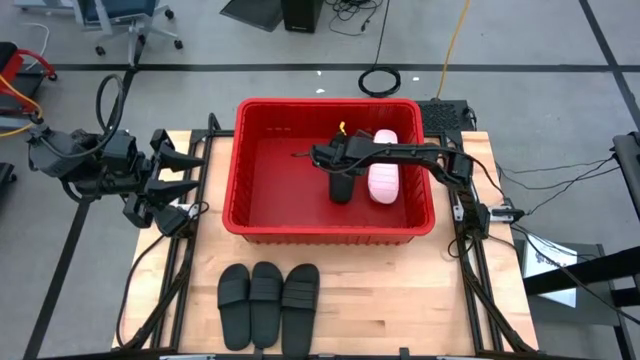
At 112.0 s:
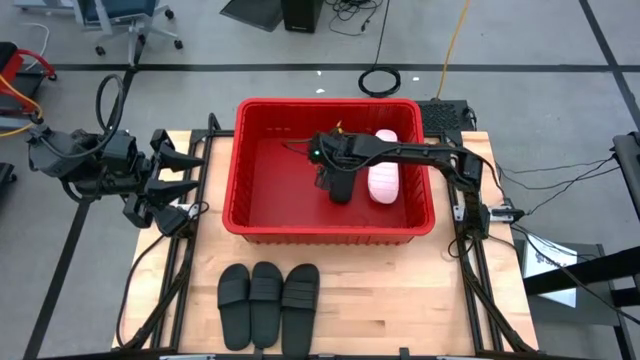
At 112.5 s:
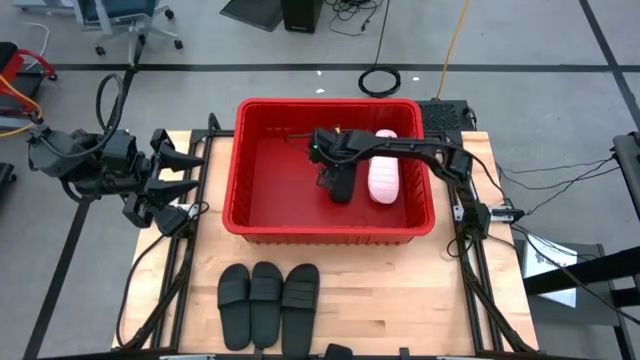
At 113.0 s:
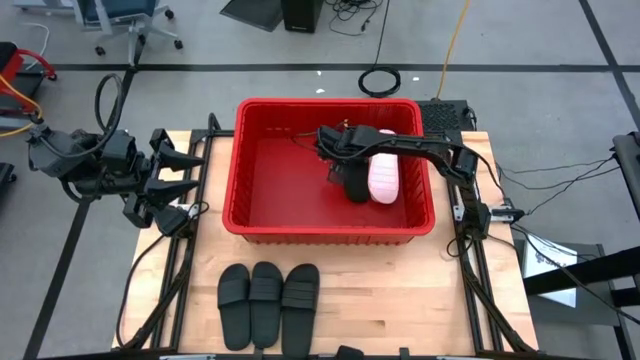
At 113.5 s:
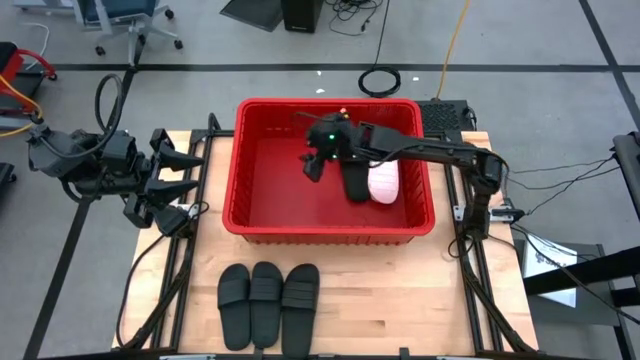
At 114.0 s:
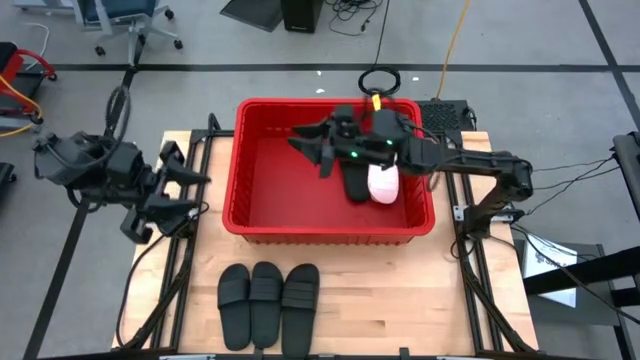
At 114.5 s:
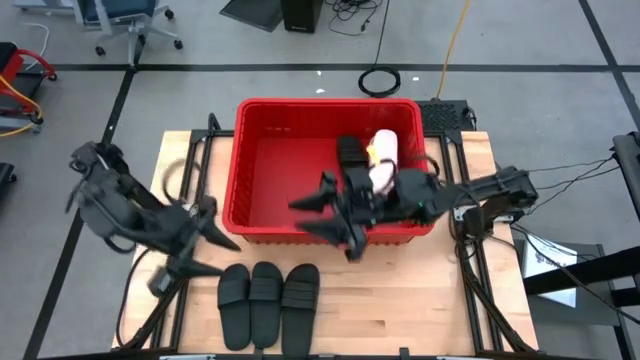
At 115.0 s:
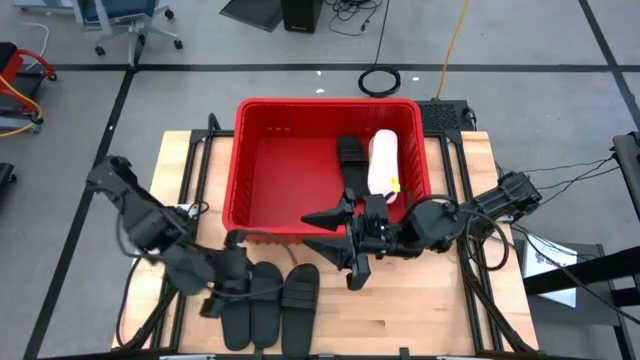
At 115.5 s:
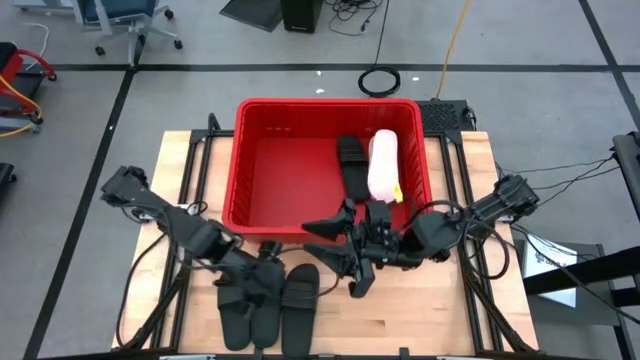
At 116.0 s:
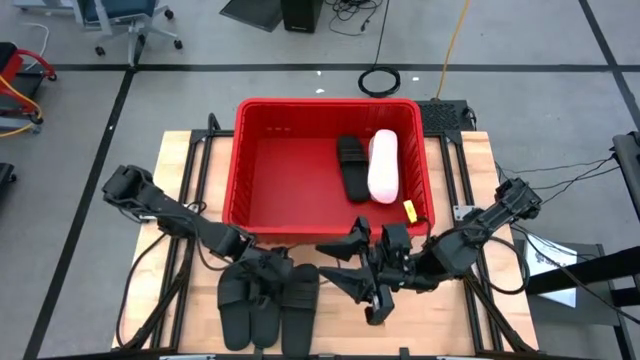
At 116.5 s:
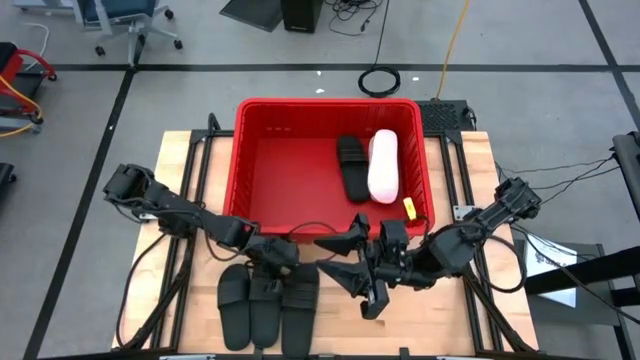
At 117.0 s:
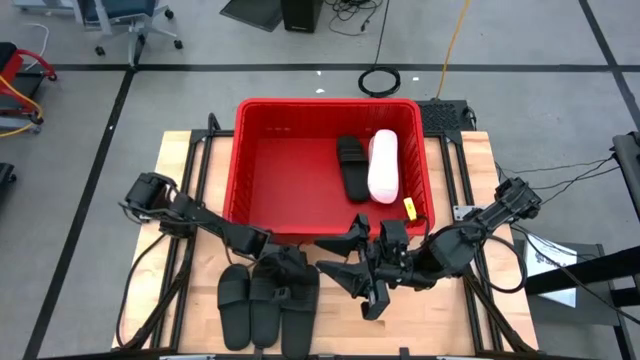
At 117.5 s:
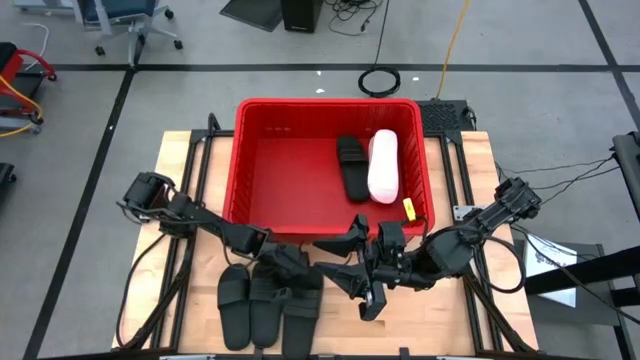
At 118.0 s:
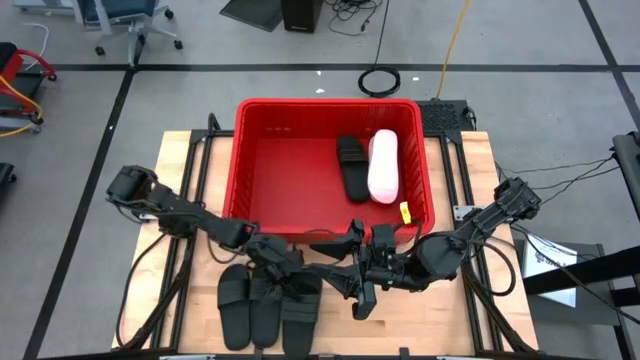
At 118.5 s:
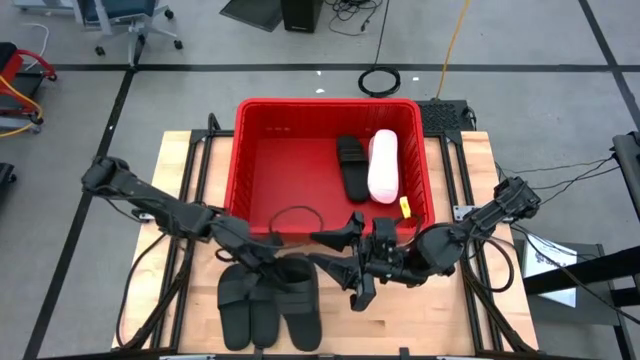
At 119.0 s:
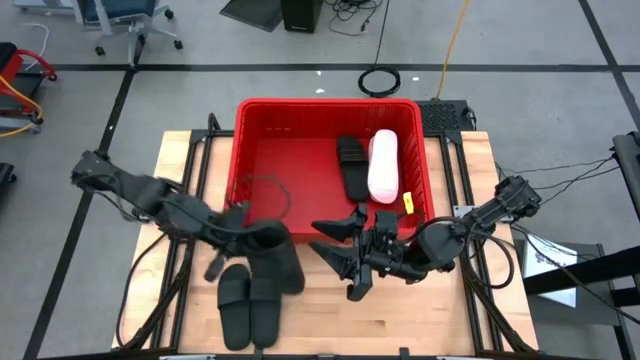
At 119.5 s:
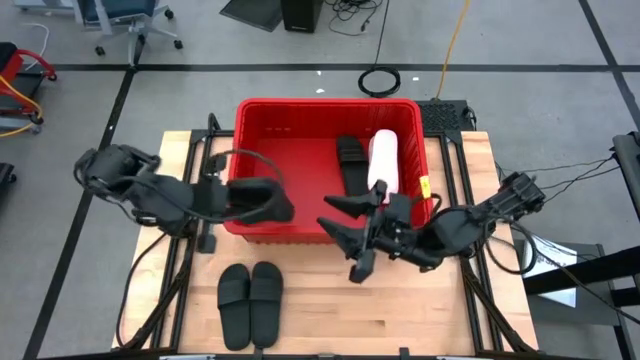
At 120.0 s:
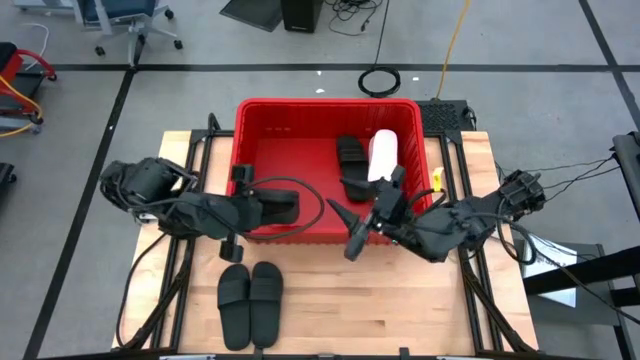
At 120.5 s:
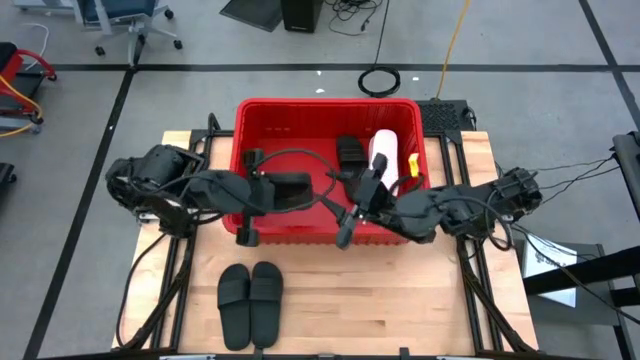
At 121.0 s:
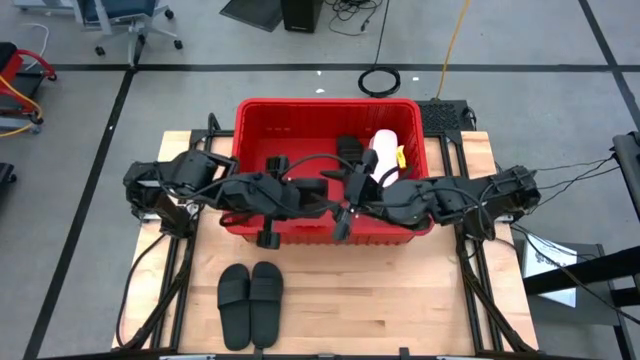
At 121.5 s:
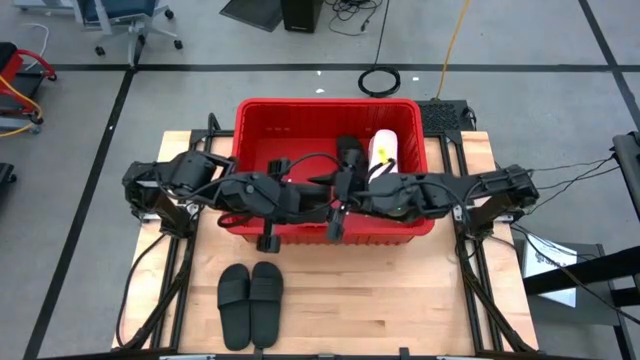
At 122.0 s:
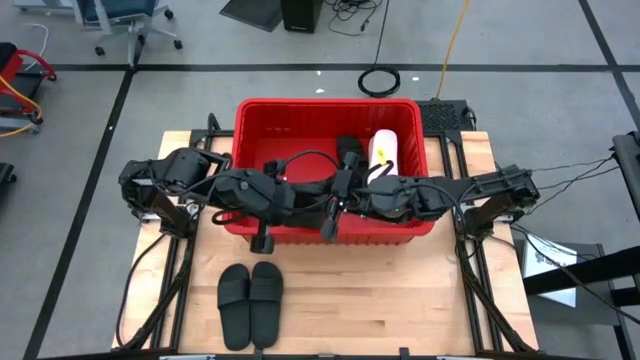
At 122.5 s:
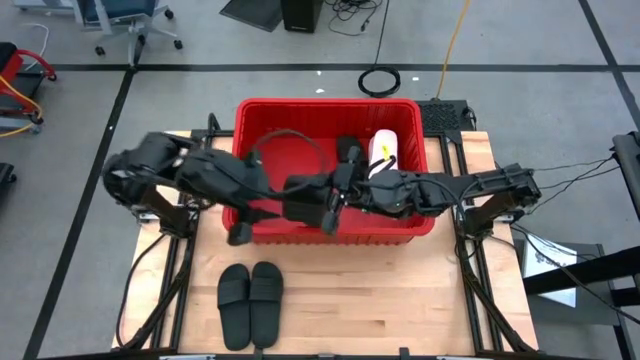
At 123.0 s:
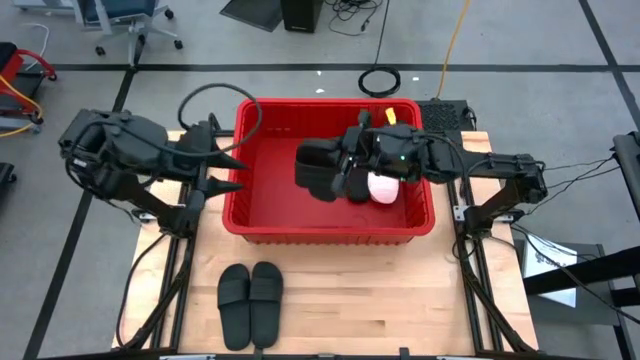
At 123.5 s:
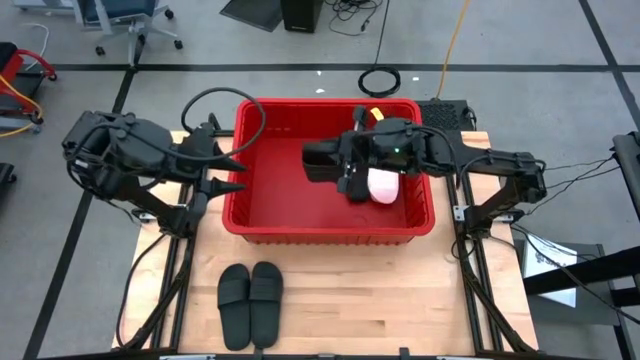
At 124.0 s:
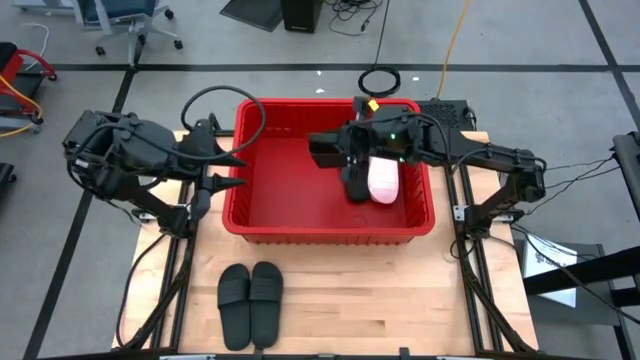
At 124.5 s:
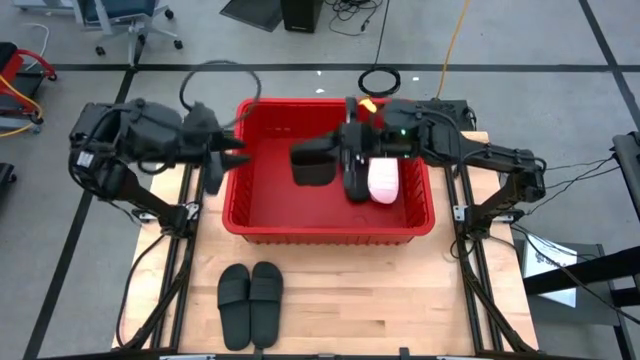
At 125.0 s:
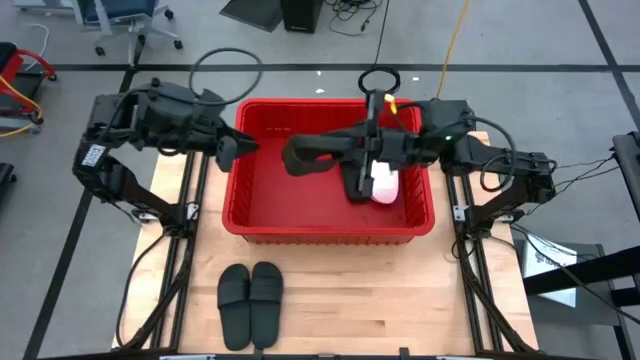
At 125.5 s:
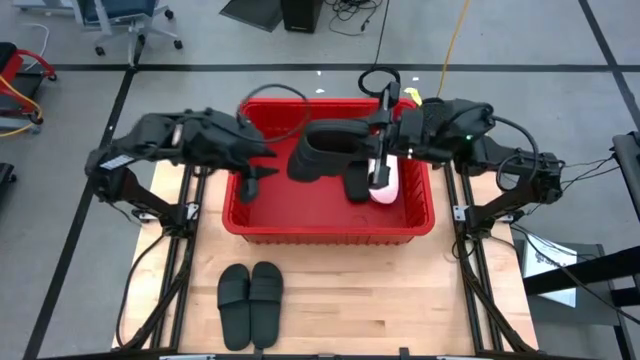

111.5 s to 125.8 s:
Task: Pick and place slides into bin
Stack the black slide on top of the black slide in the red bin

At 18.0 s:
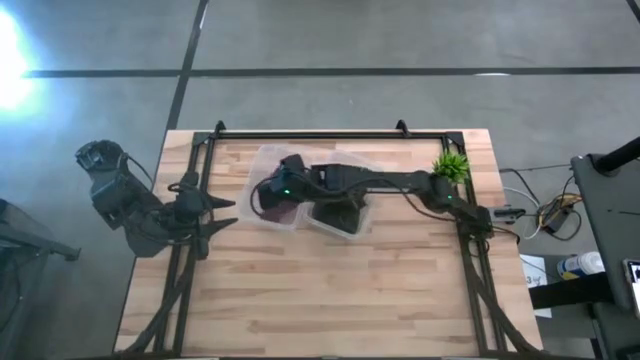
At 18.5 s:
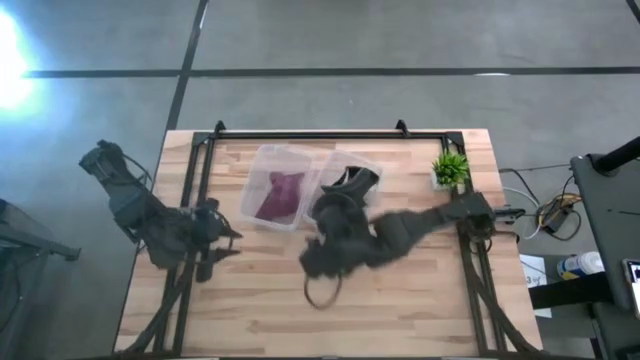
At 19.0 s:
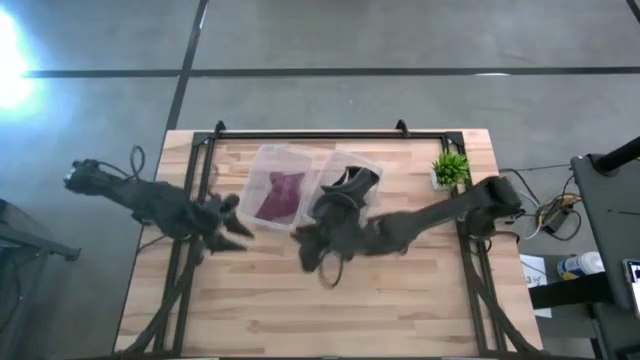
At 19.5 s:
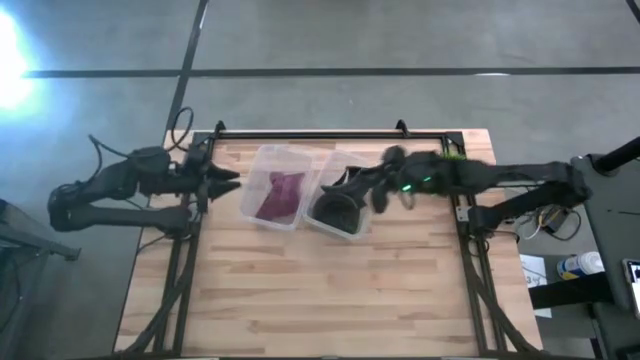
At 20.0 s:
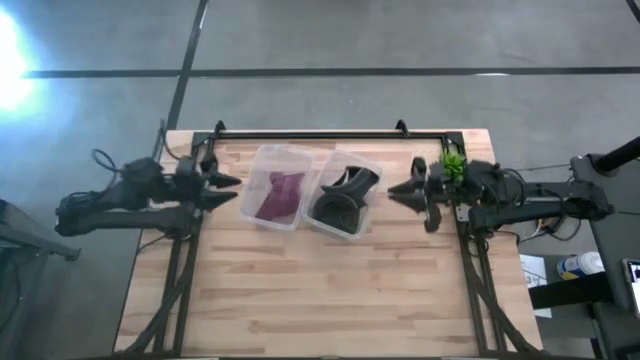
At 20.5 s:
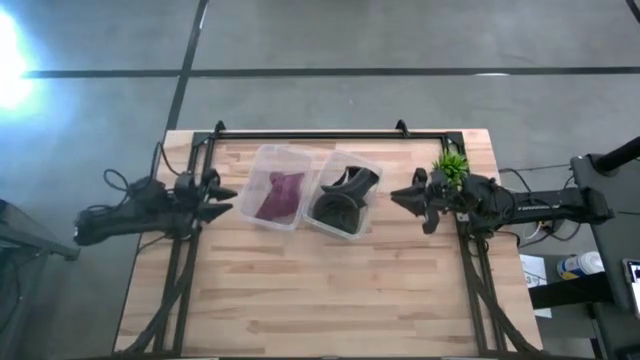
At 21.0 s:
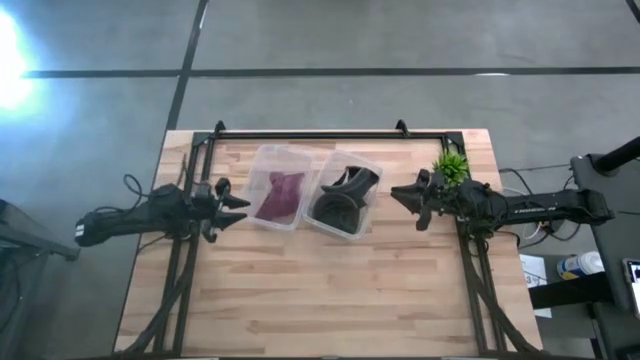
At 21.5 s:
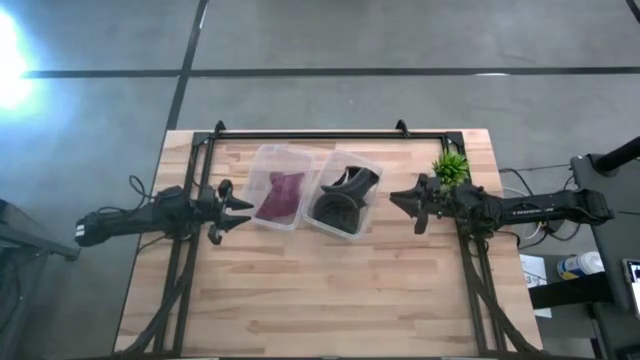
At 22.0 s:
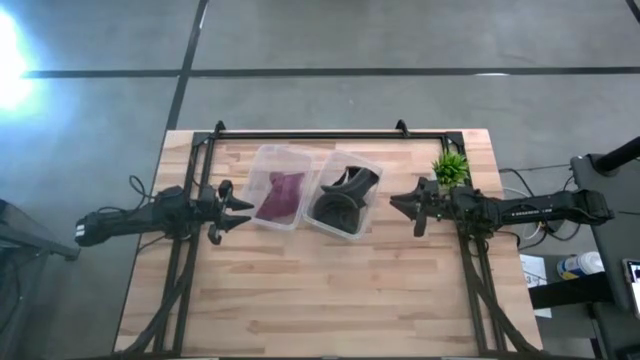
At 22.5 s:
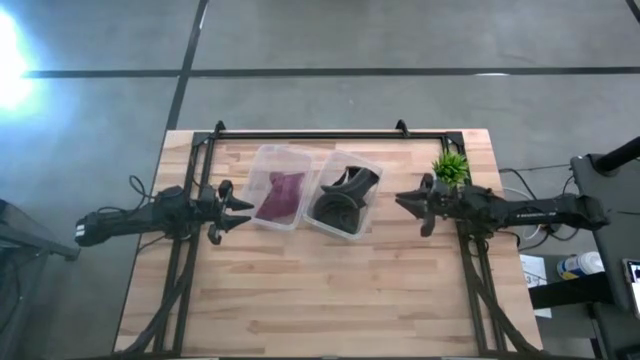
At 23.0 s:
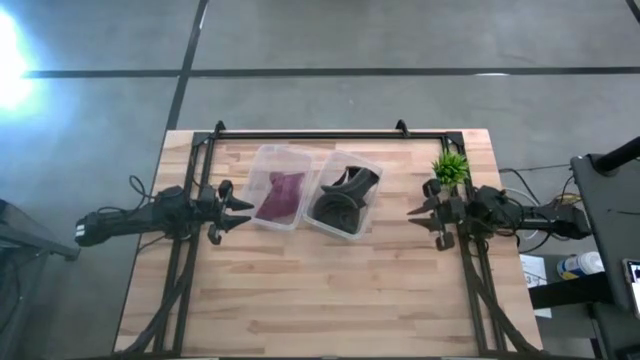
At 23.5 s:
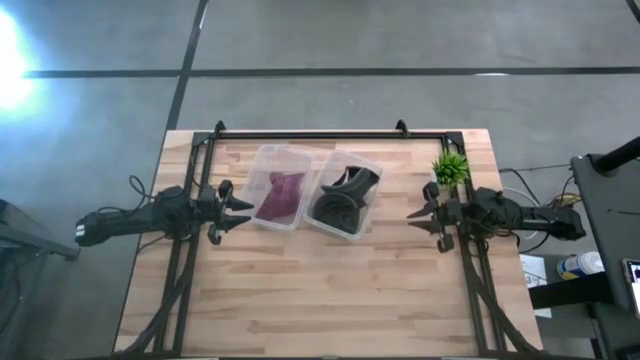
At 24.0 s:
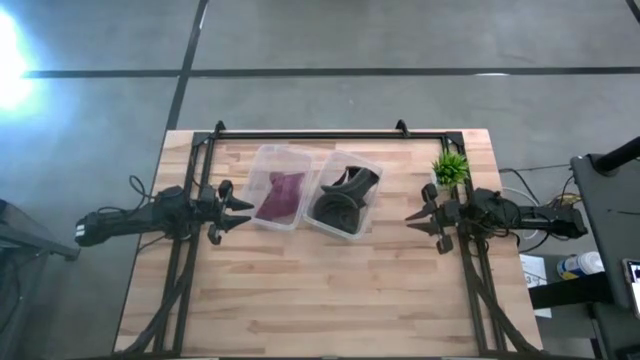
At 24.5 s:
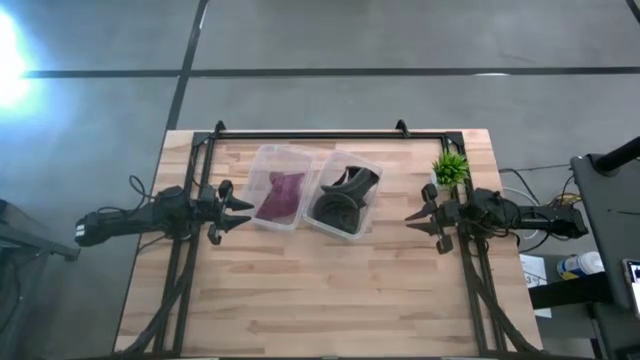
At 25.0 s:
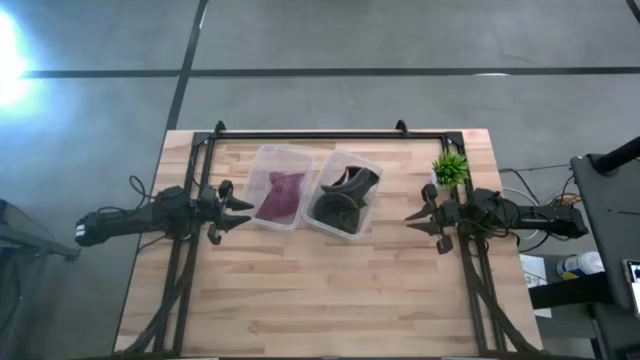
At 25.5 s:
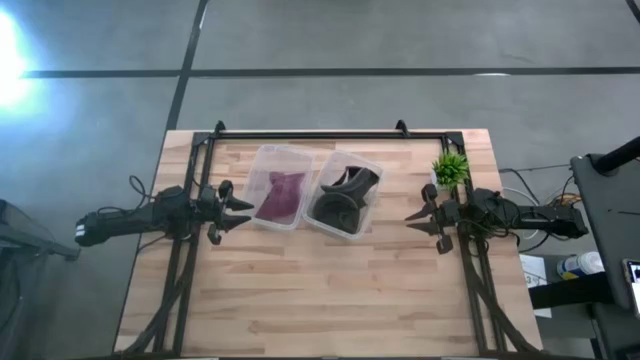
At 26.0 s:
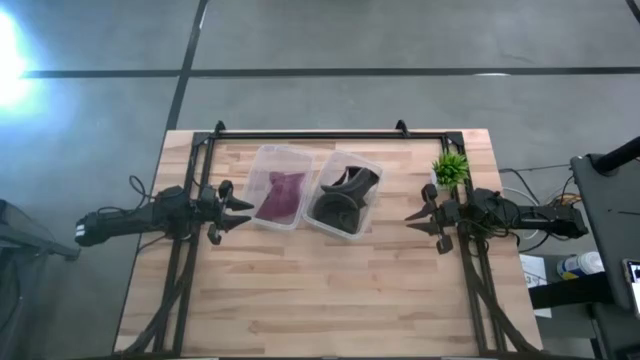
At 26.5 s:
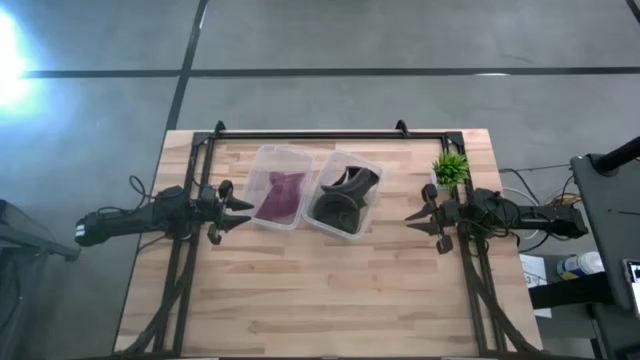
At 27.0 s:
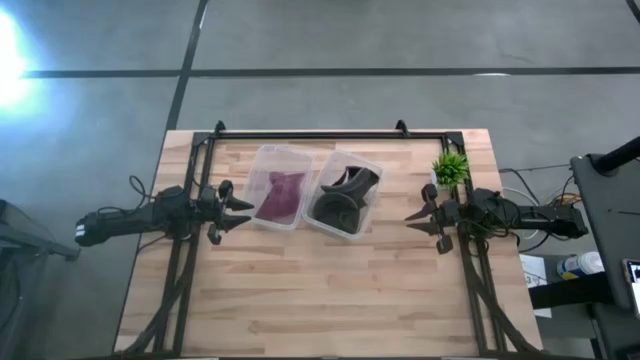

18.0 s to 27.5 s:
Task: Pick & Place hat
Return to Home Position
